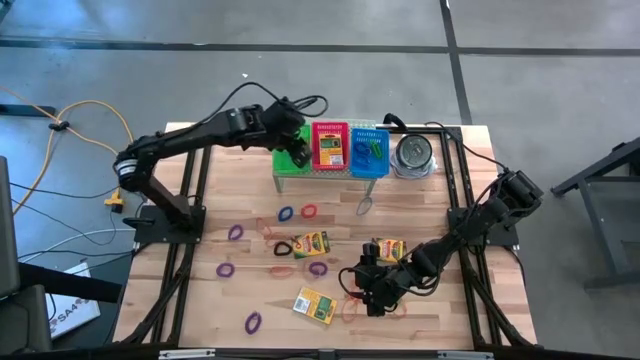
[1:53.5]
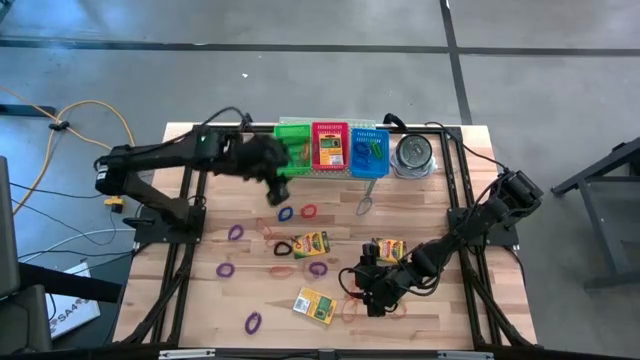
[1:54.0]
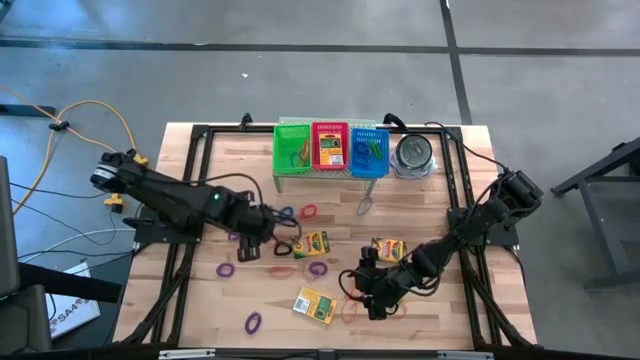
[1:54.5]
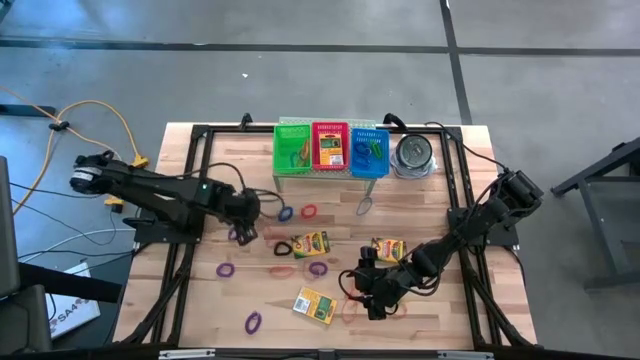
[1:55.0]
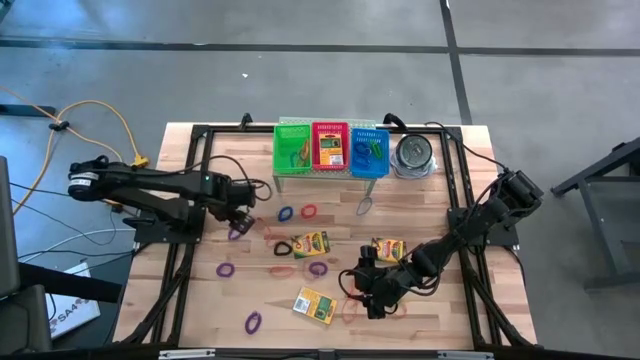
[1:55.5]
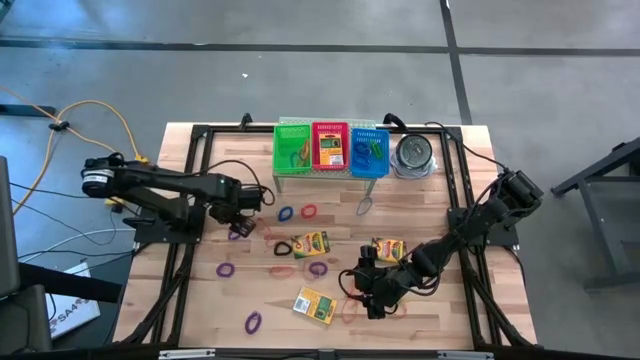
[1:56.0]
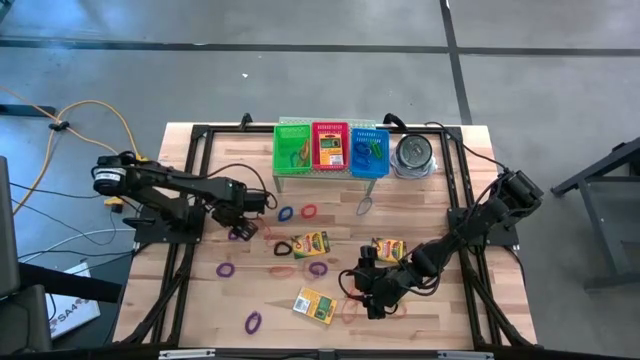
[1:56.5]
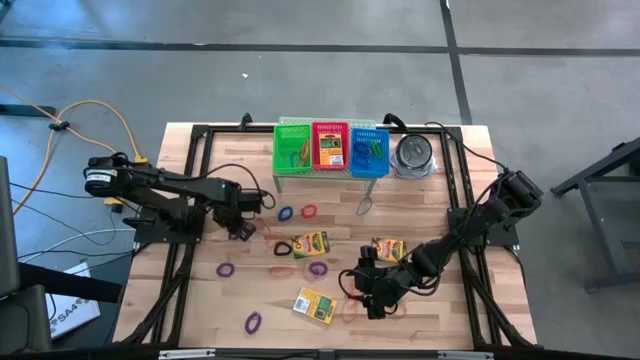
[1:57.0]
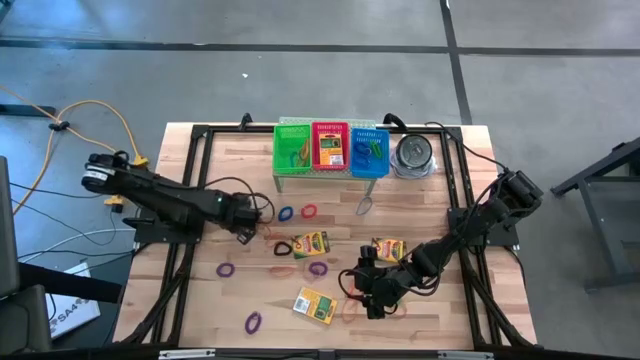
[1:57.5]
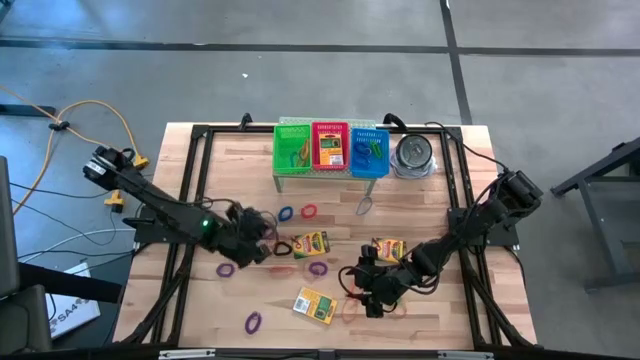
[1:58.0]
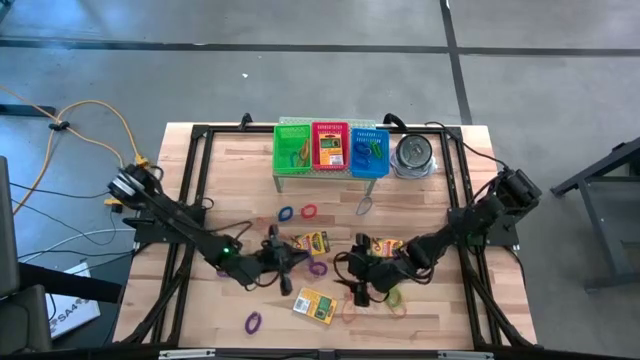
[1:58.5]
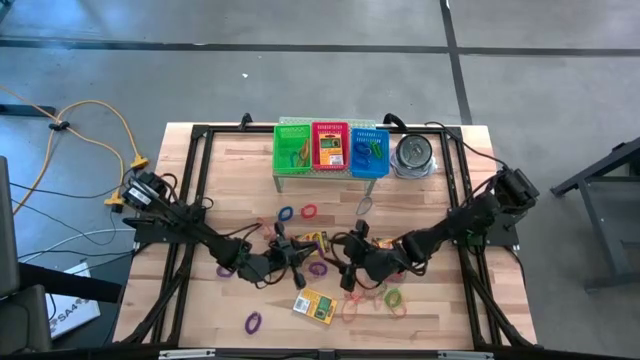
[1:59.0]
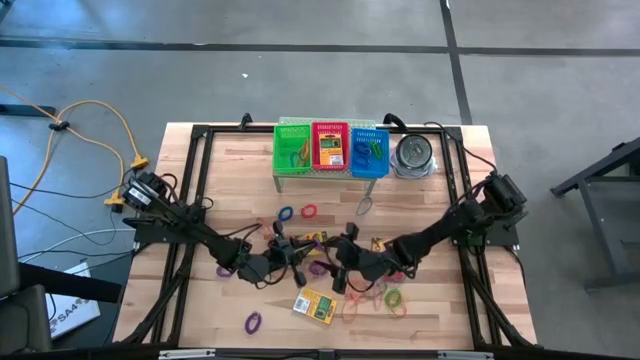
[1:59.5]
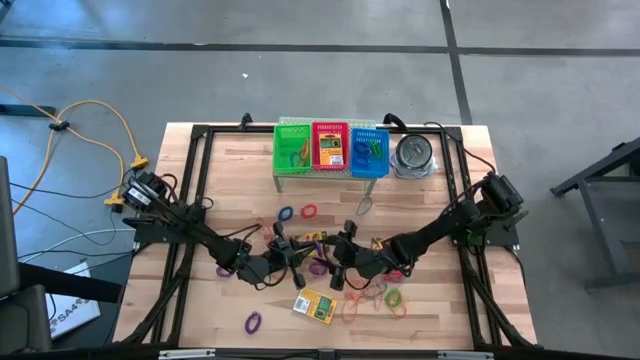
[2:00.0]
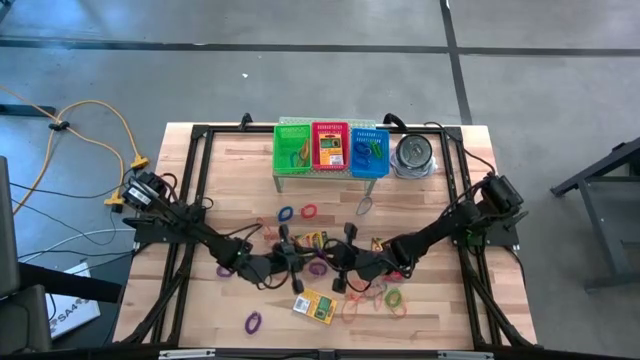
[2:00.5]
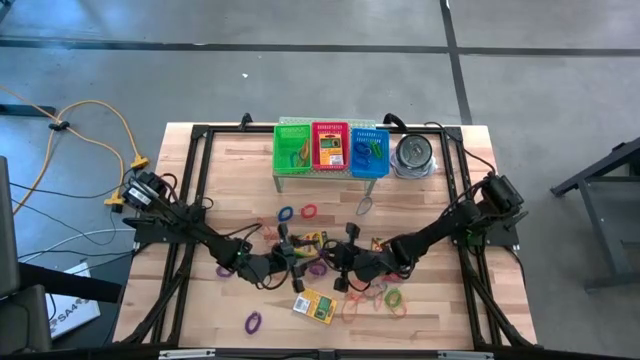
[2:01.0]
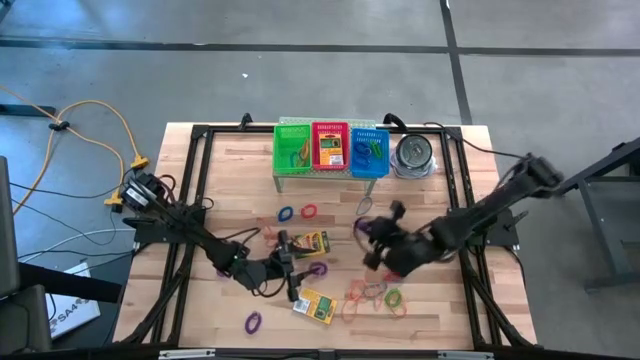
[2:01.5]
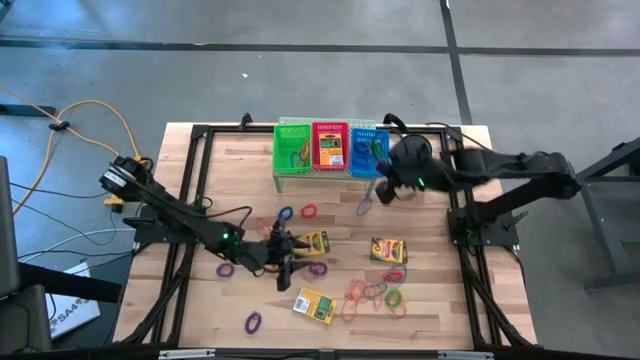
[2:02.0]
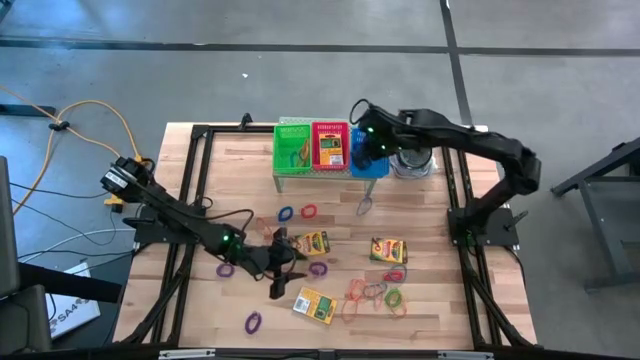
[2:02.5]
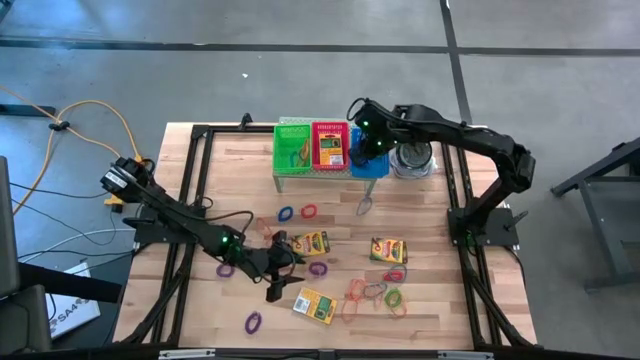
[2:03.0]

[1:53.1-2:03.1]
Task: Pick & Place Office Desk Supplies
Put the violet spring keychain into the blue bin on the shelf

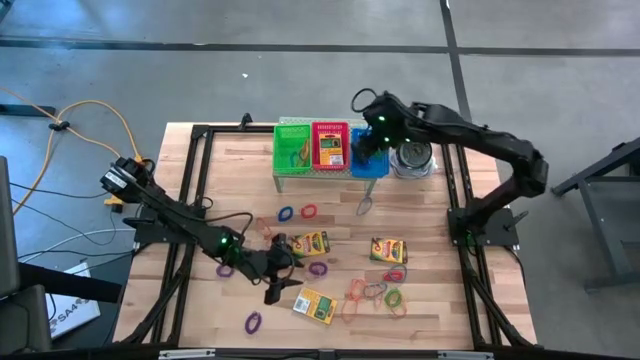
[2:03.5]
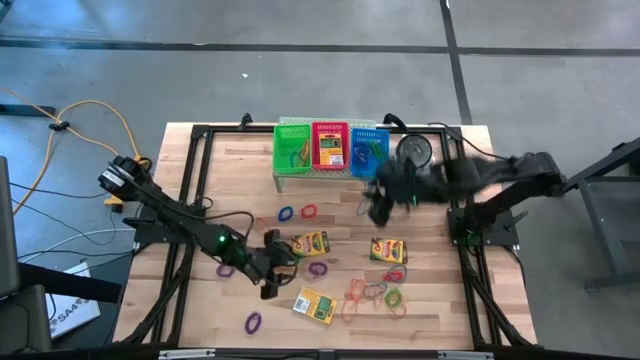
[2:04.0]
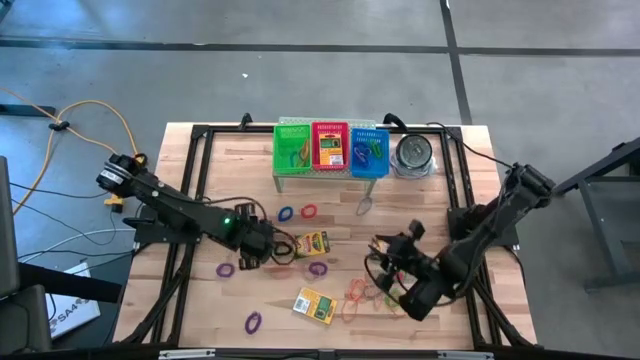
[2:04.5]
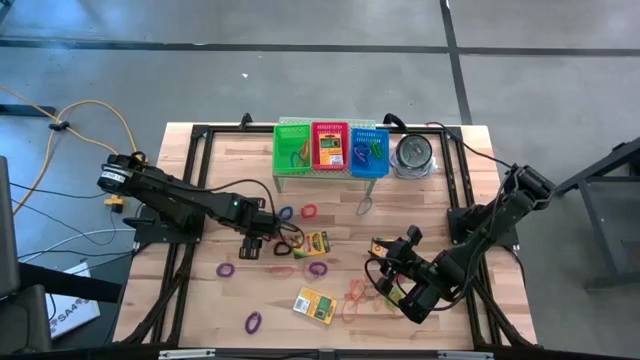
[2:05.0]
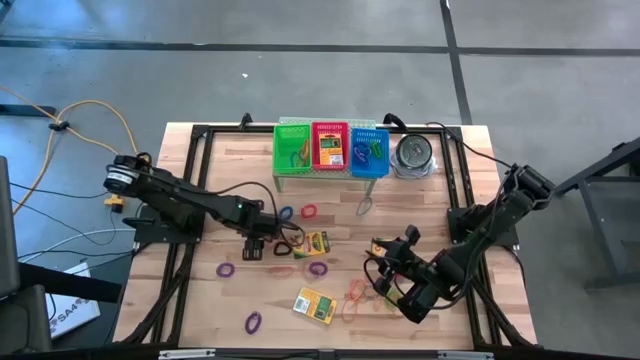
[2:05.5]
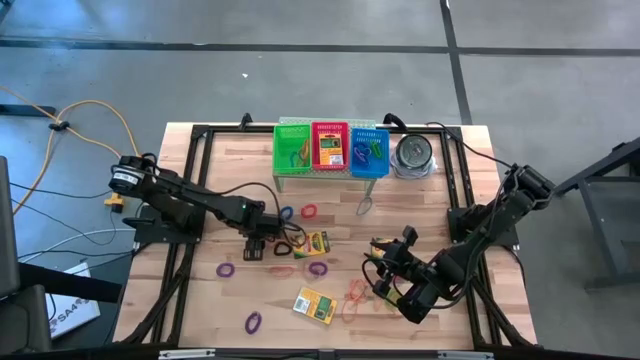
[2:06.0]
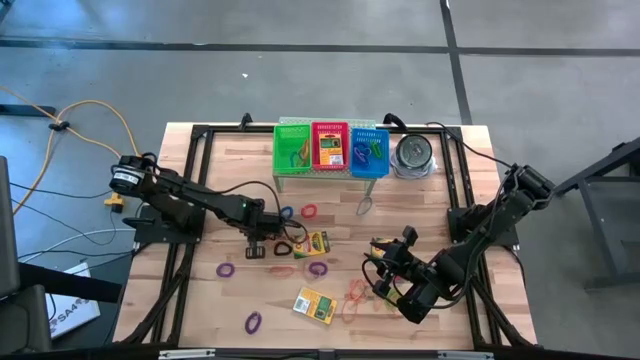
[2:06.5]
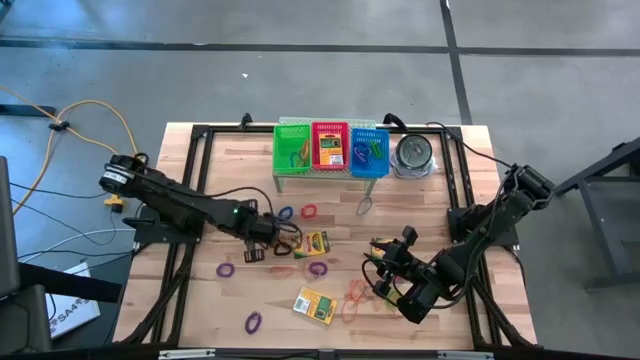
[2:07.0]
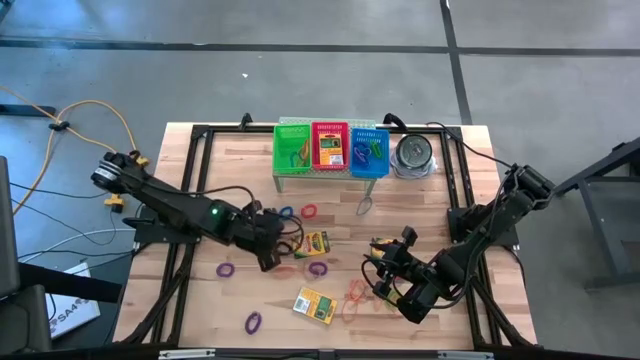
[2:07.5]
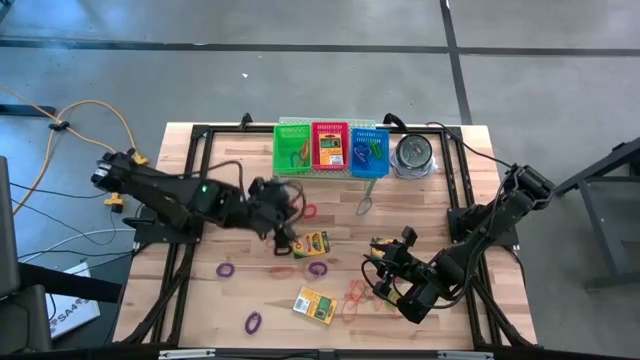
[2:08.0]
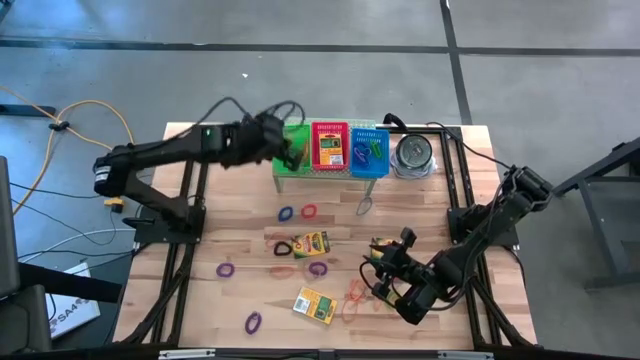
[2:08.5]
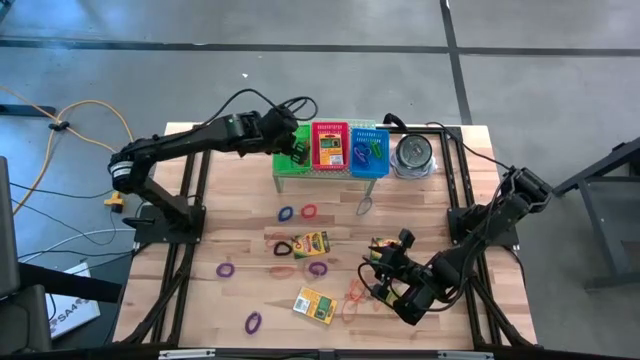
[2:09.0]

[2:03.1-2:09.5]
Put the orange rubber band into the green bin on the shelf
